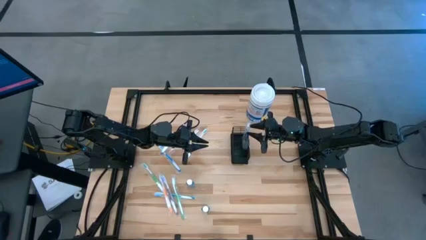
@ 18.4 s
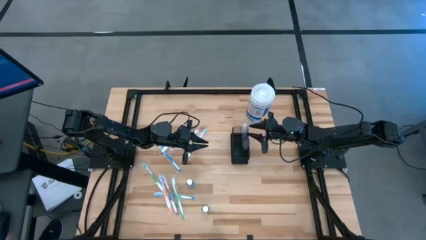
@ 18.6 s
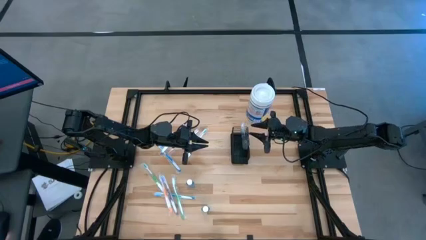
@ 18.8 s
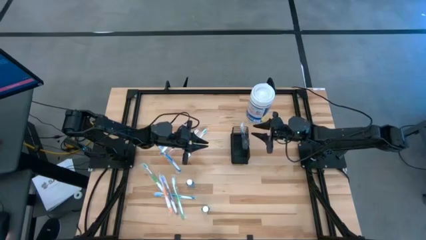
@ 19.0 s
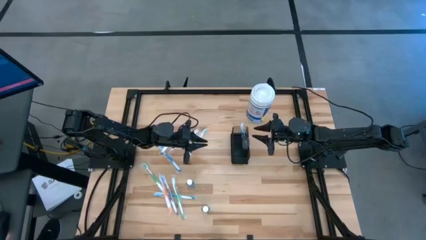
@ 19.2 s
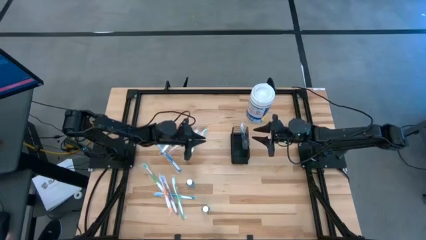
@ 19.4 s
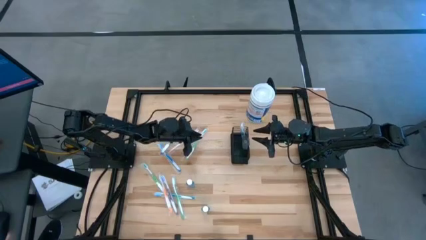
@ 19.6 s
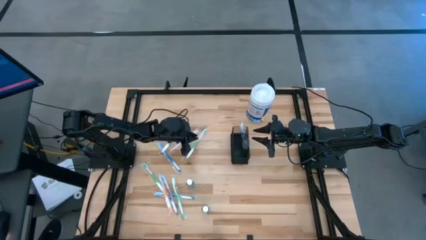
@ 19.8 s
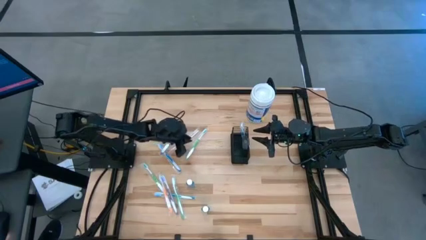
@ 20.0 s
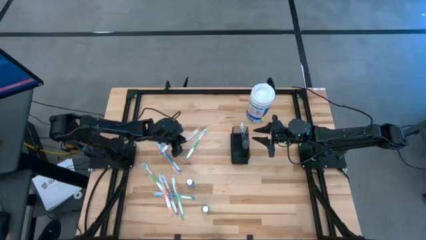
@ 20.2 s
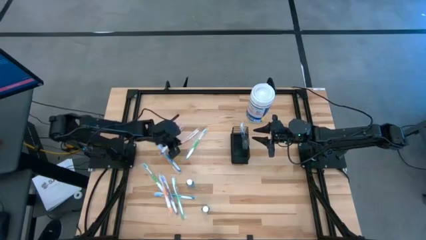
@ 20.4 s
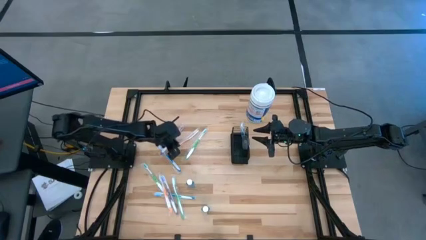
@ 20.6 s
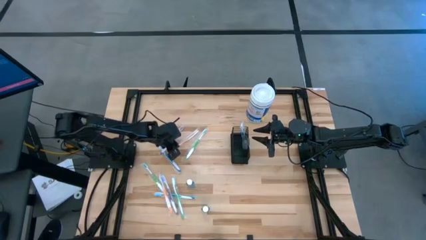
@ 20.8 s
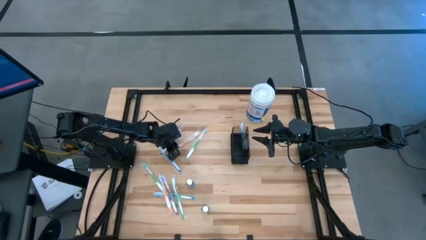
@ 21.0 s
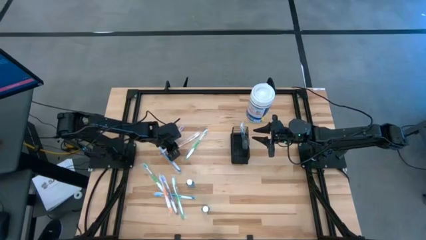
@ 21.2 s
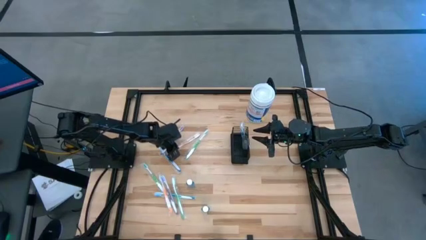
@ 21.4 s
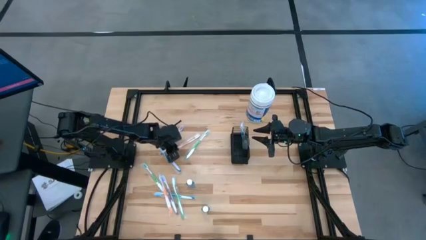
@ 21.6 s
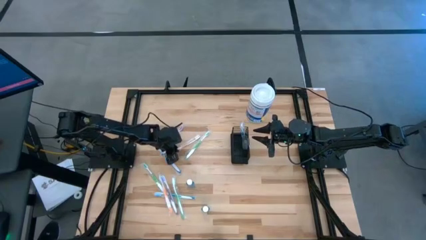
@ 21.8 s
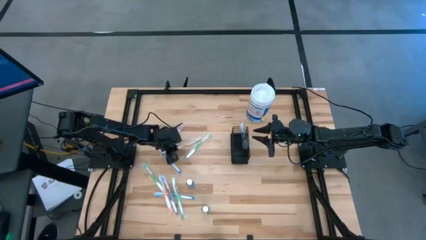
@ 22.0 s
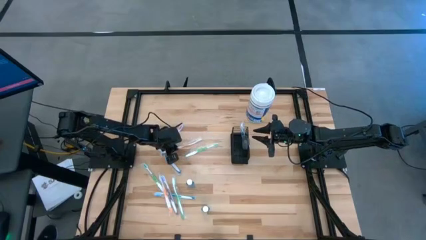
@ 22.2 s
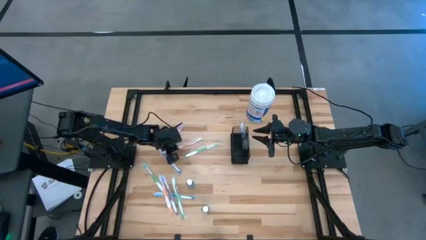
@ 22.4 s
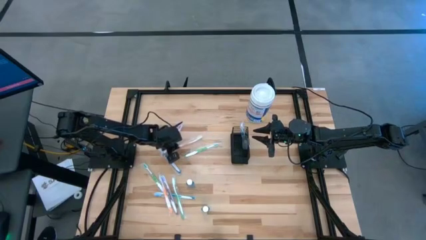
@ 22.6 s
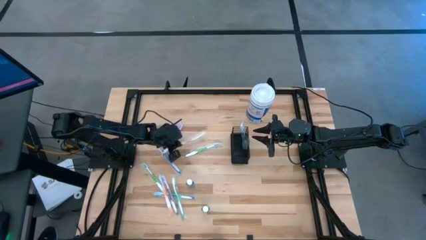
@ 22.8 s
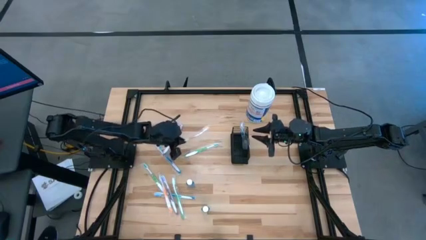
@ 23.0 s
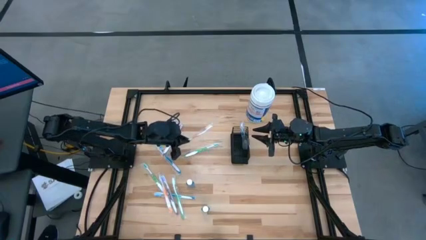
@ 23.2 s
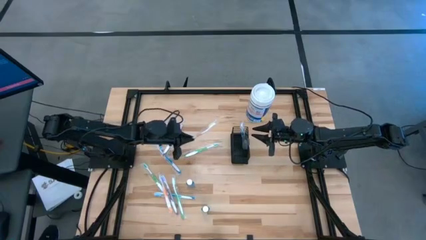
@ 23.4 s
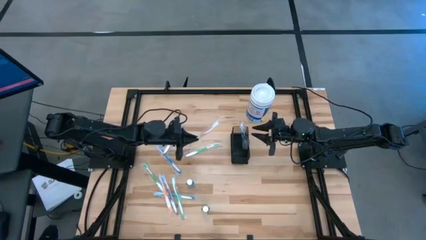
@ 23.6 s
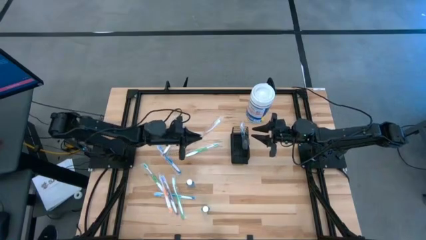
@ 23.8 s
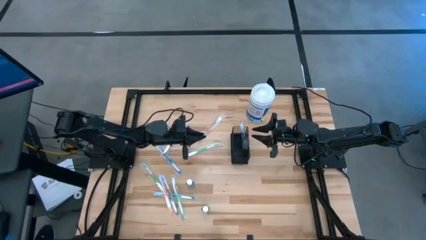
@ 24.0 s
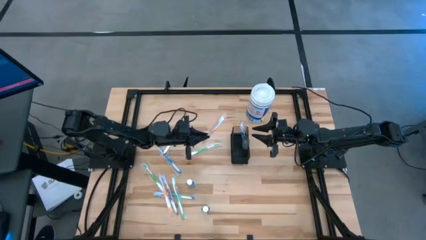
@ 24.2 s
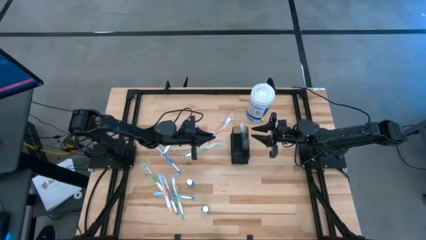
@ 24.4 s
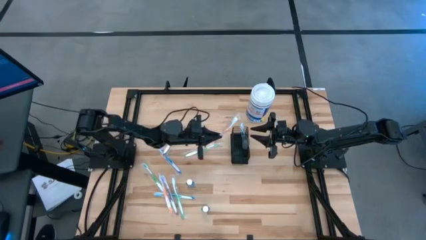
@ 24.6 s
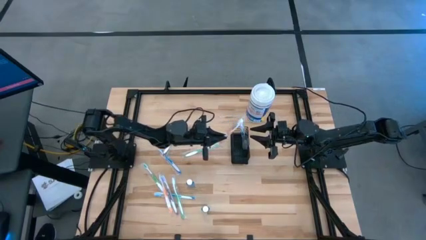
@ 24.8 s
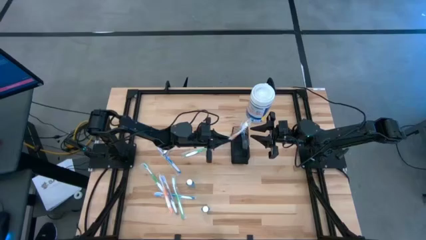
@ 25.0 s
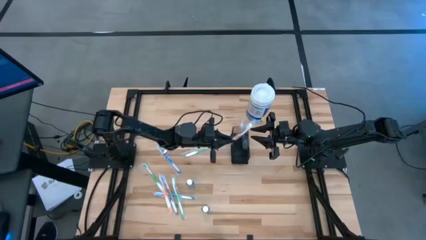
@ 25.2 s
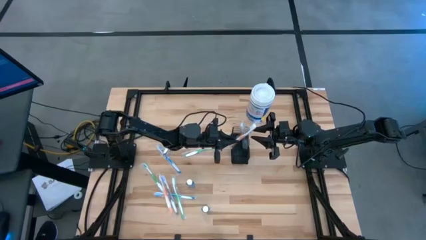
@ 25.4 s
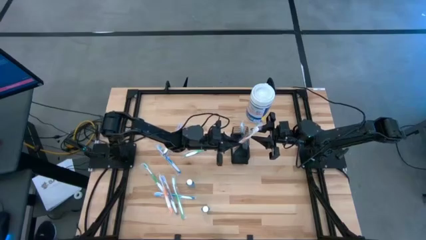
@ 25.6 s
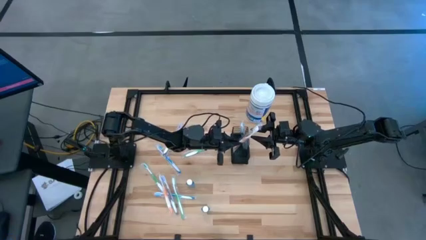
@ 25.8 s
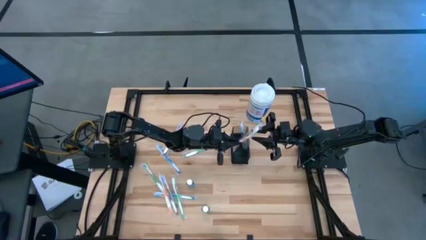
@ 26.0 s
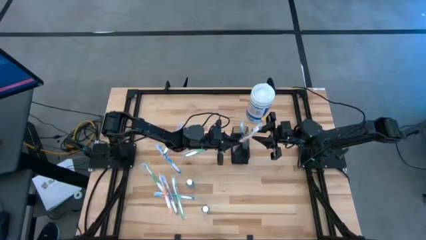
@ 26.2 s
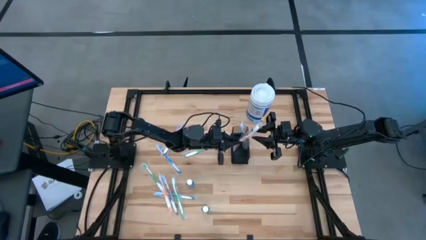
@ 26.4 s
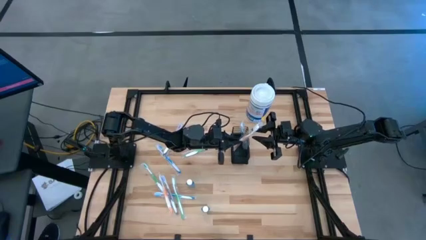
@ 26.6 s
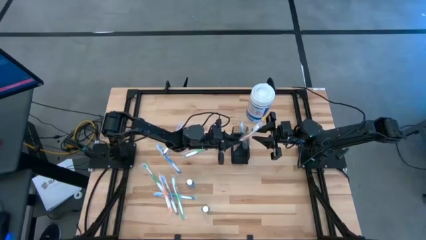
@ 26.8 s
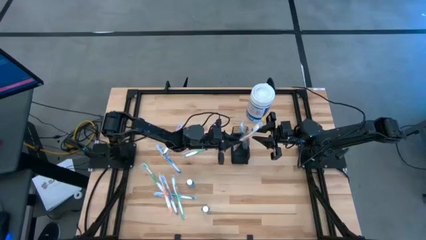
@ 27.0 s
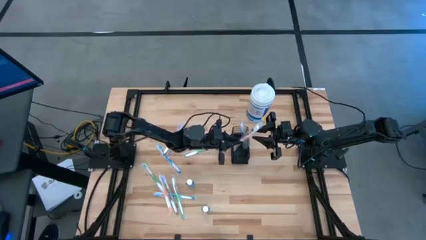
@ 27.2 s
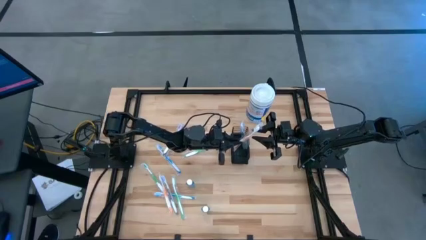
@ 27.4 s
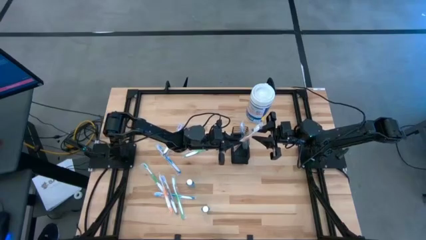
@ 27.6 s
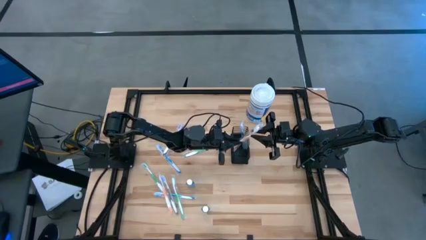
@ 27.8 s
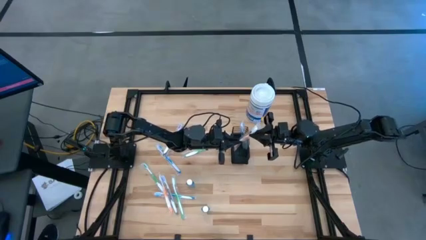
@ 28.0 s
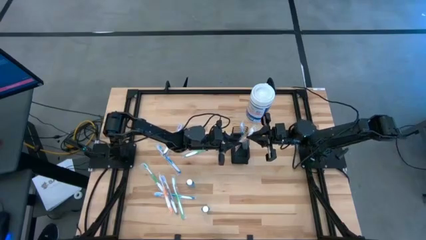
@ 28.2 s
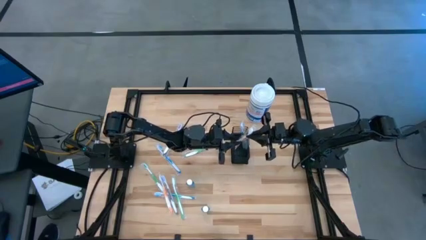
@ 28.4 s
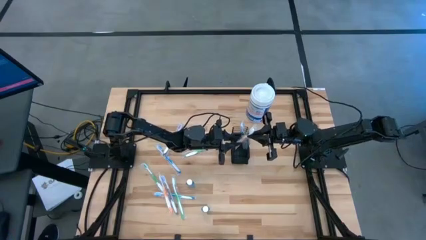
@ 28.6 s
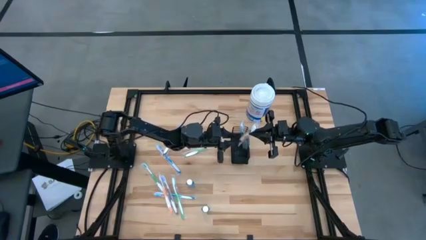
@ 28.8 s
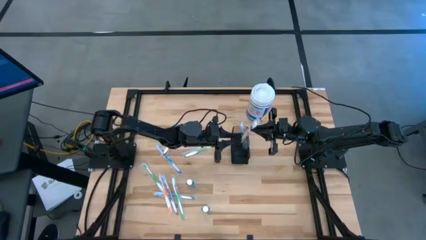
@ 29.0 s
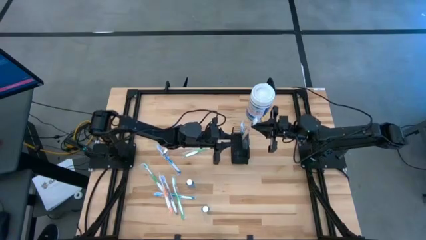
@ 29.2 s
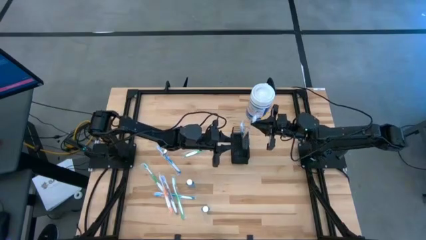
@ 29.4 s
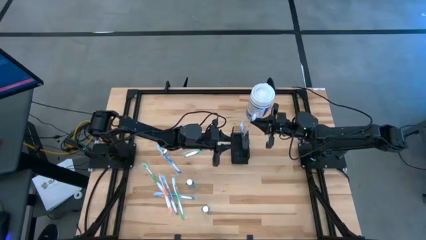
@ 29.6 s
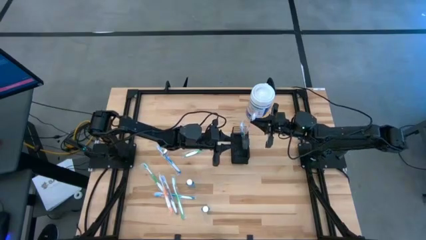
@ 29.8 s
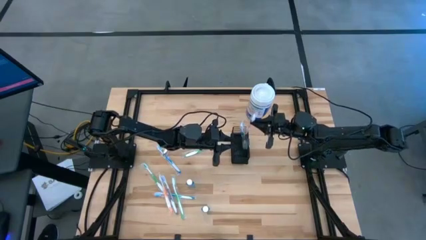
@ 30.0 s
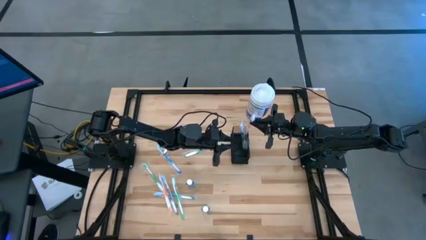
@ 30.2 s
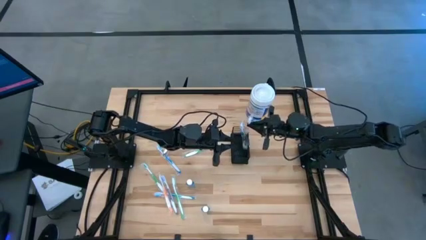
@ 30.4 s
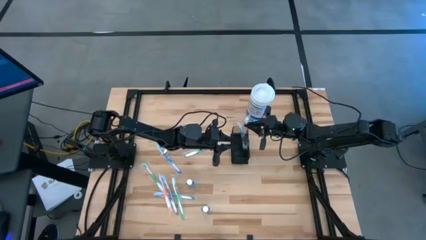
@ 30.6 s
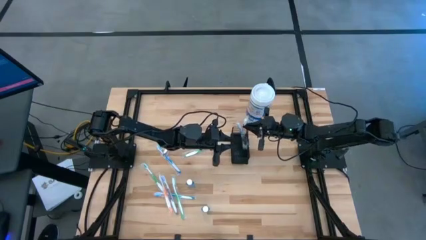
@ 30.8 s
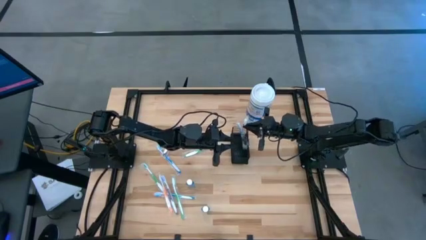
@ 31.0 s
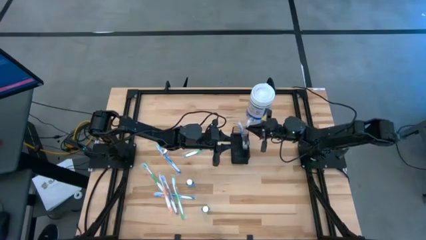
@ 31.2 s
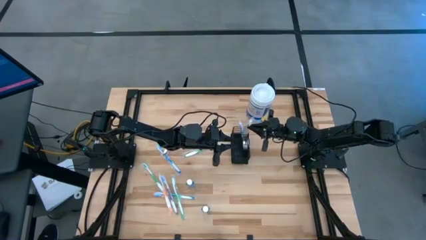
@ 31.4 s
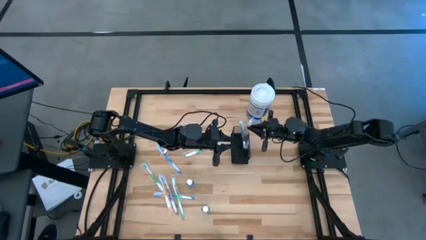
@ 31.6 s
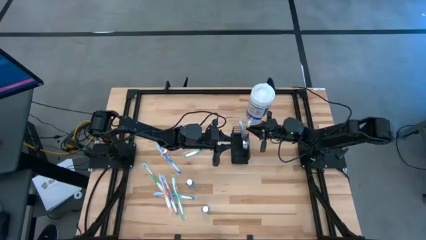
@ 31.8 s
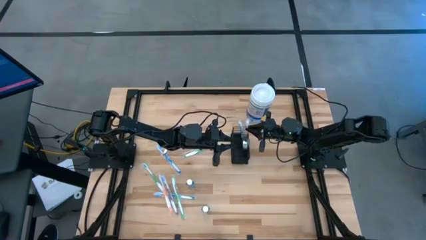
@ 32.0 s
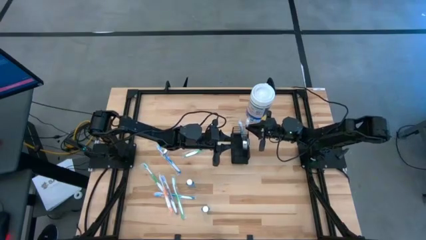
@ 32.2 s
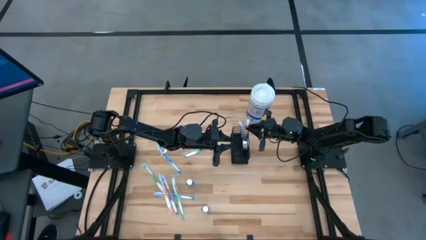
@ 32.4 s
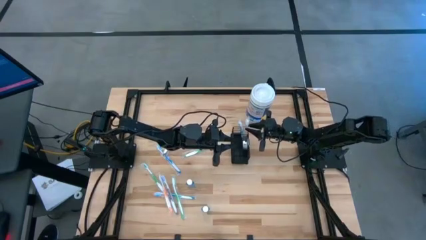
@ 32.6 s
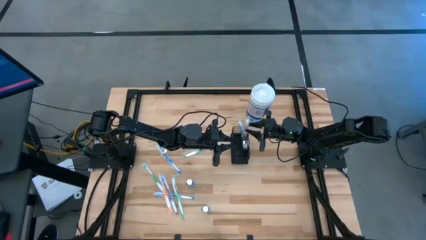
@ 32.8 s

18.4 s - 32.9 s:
Task: Pick & Place toothbrushing station
Put the top orange toothbrush into the wire mesh organizer

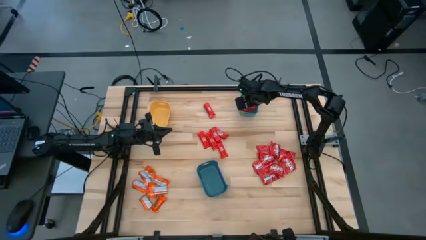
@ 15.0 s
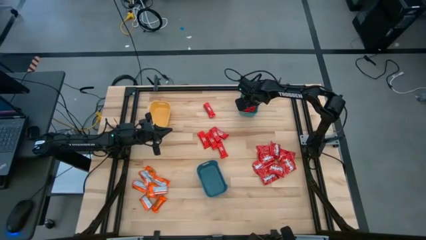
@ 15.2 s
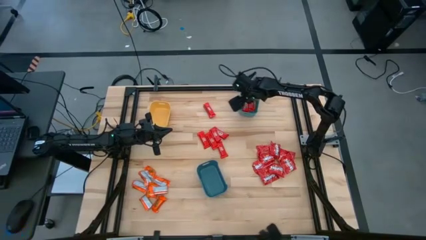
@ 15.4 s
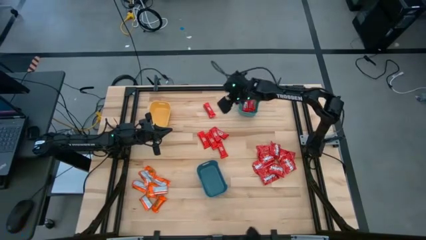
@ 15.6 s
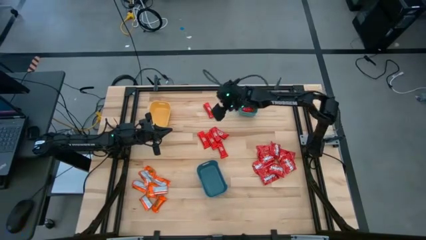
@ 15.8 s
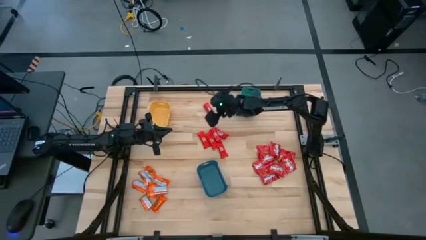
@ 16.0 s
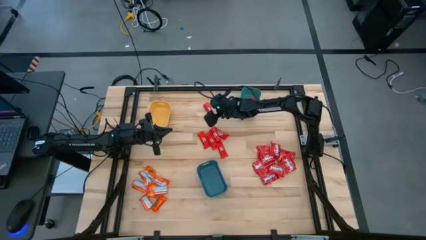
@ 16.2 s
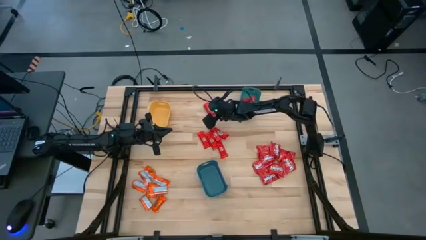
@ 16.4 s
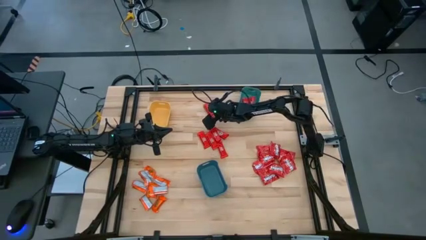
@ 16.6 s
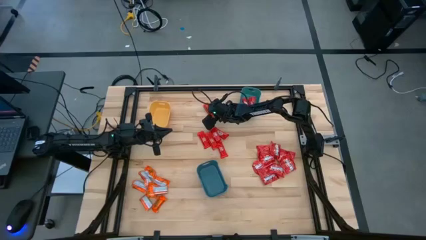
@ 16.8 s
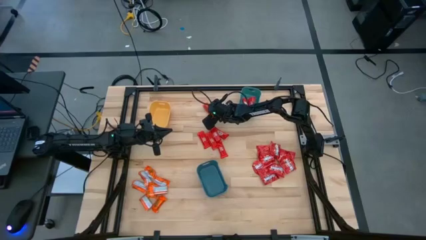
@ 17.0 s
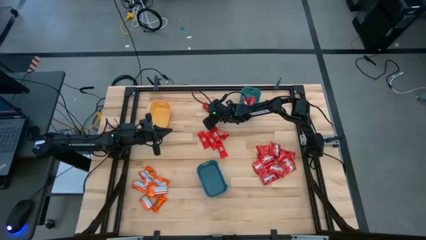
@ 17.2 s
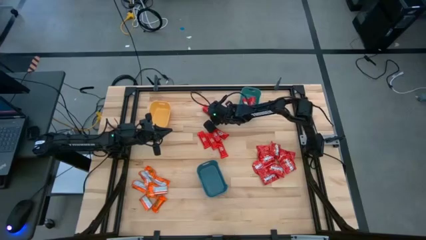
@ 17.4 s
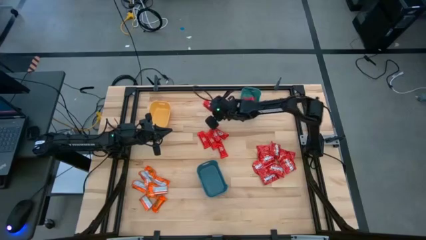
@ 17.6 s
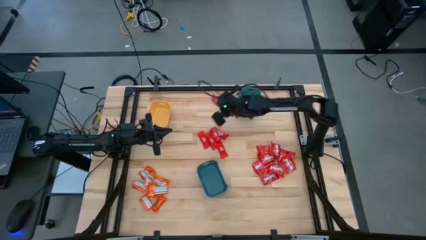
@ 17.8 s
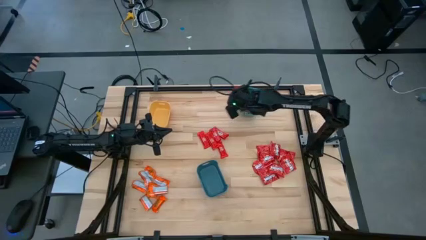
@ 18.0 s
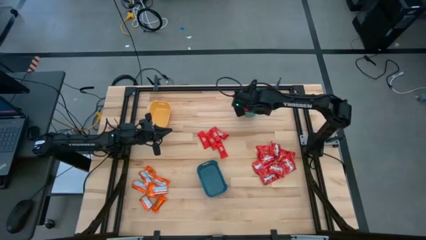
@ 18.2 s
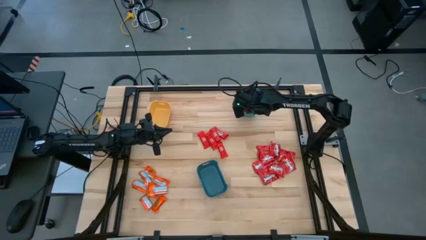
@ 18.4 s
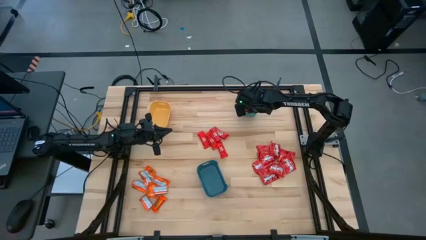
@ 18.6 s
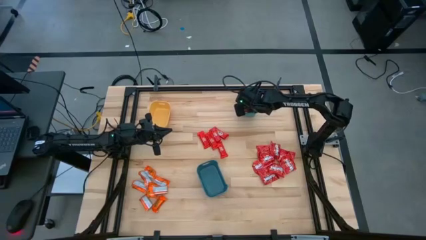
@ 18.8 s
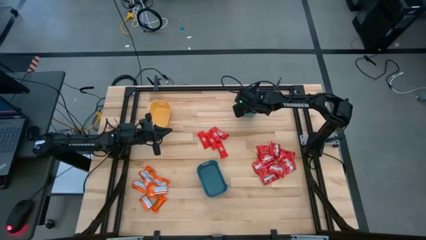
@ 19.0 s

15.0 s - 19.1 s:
Task: Sort candy
Put the red chocolate bar into the green bin
